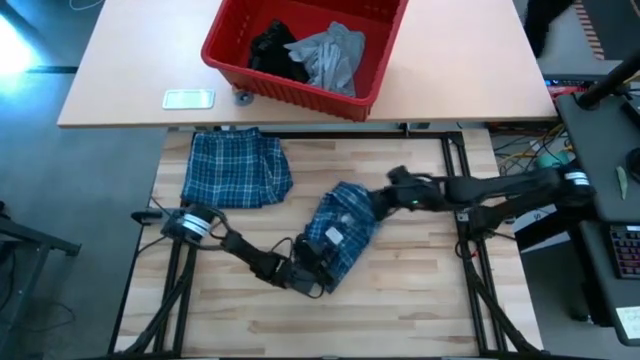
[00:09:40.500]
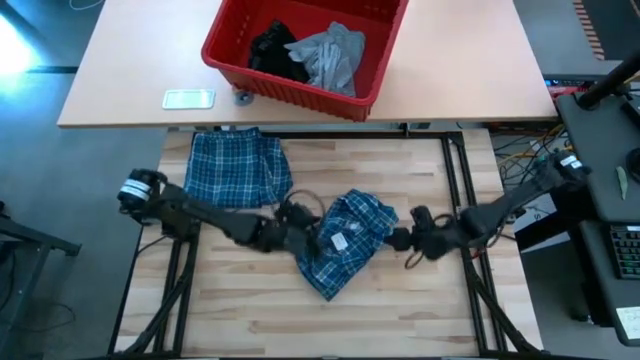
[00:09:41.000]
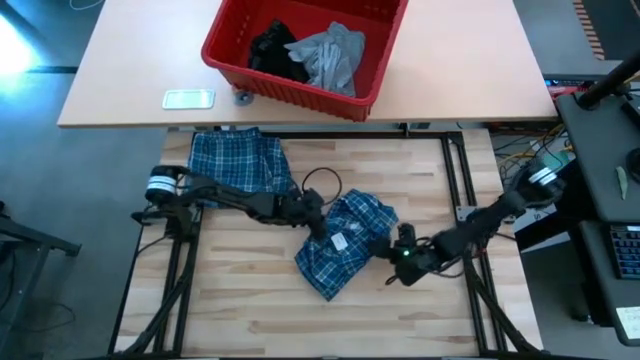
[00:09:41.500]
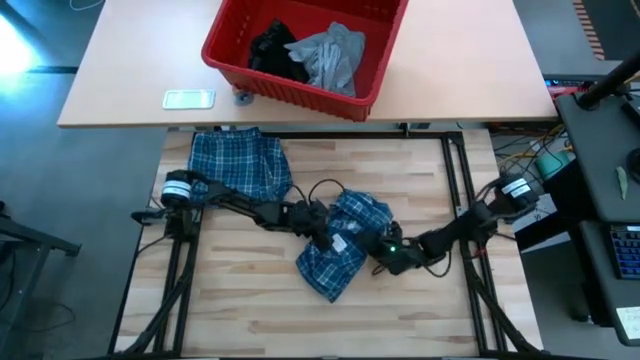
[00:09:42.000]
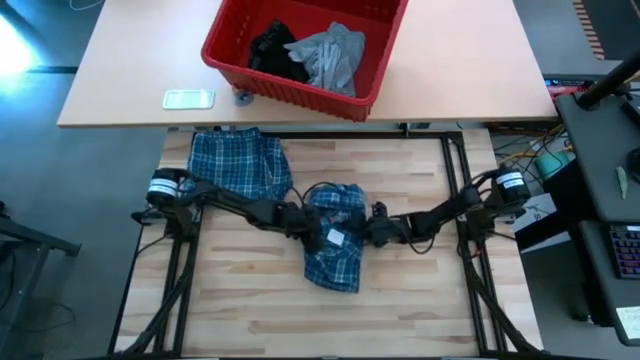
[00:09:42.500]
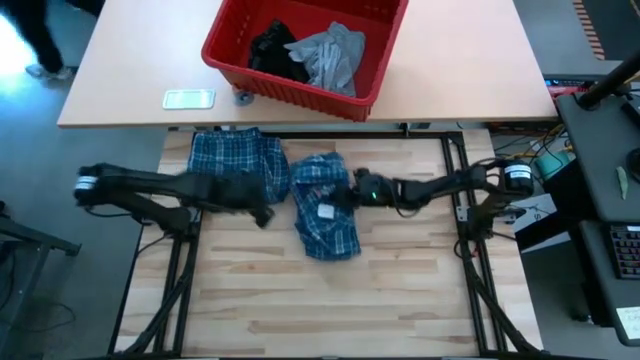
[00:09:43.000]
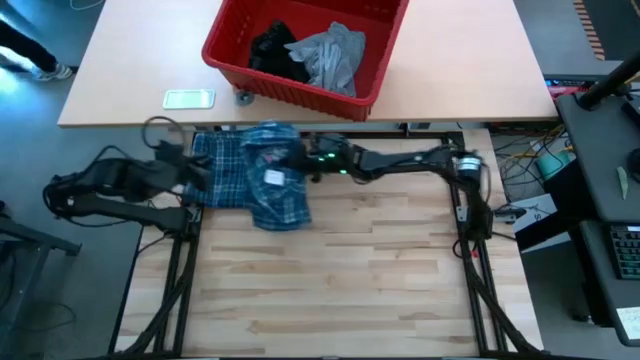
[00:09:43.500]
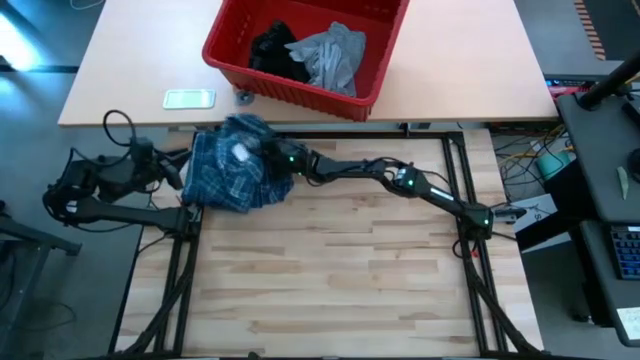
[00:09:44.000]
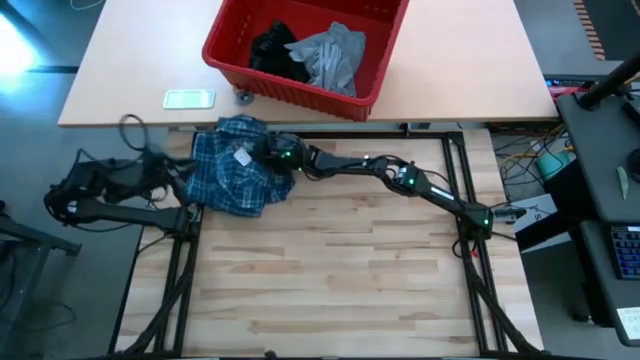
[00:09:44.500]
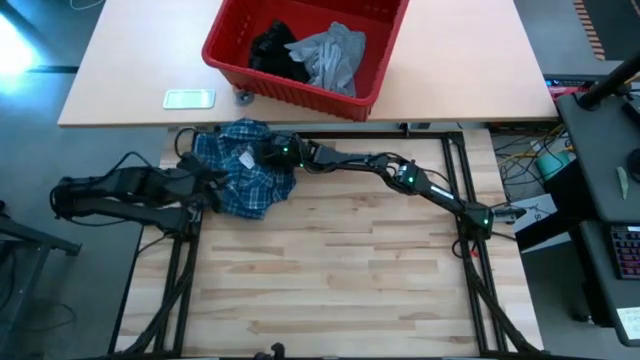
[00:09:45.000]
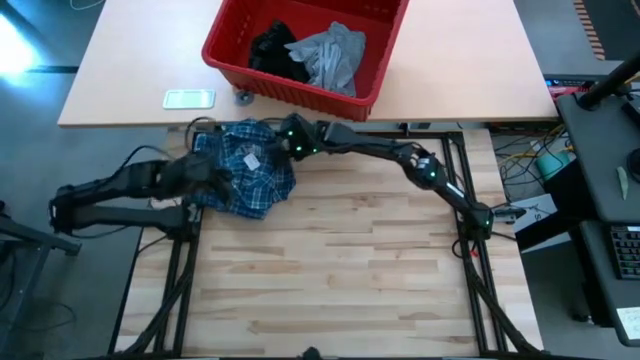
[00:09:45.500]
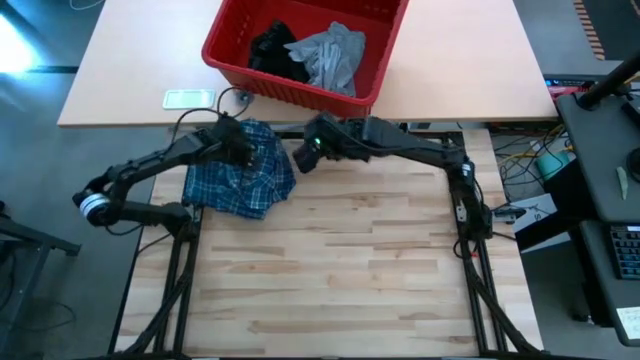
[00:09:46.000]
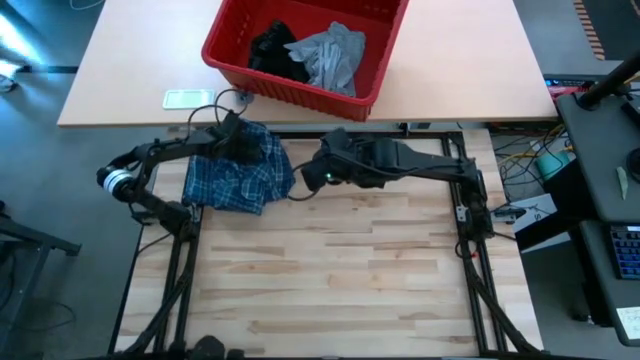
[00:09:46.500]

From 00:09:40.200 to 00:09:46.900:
Task: Fold Laundry from Bin
Stack the blue patterned long sleeve shirt on top of the blue patterned pants

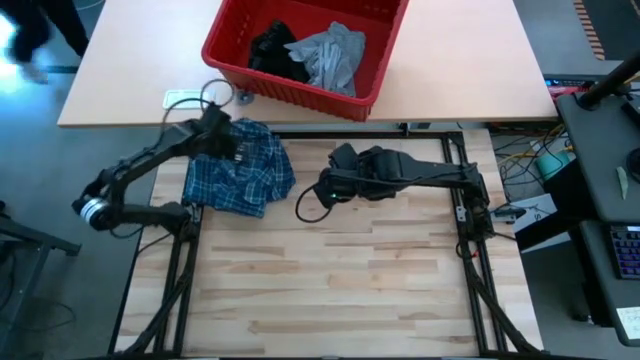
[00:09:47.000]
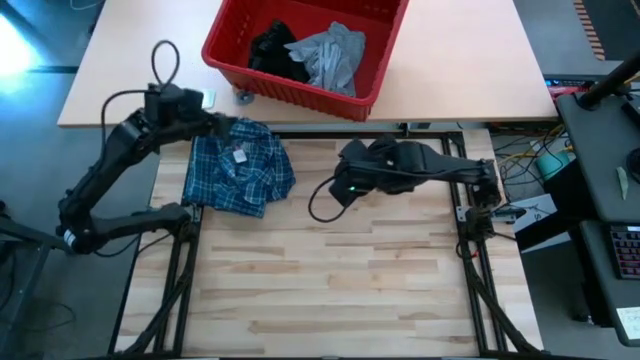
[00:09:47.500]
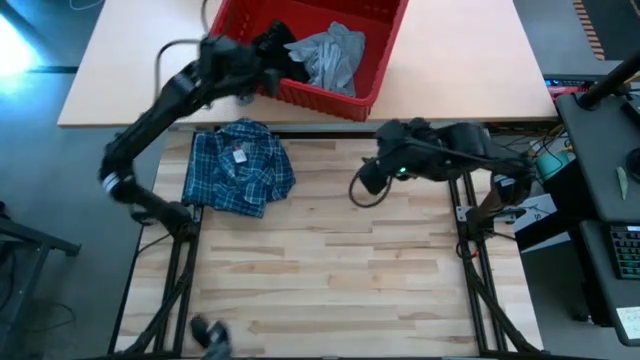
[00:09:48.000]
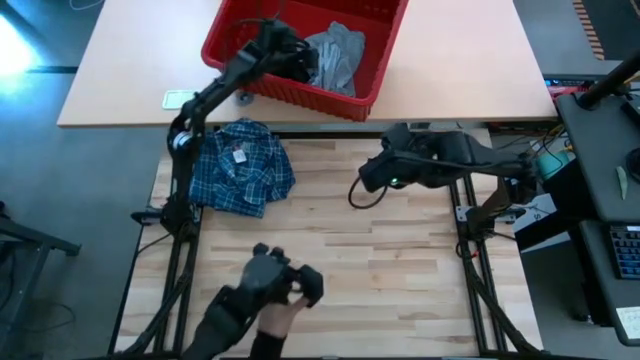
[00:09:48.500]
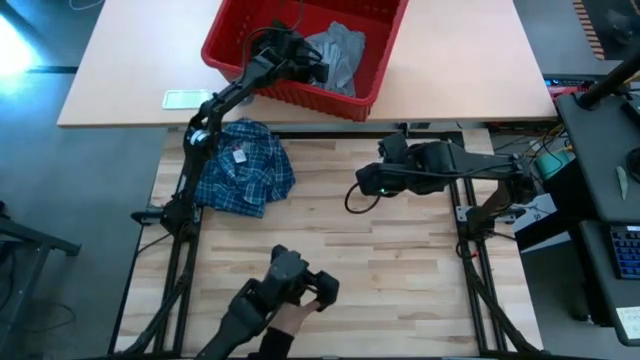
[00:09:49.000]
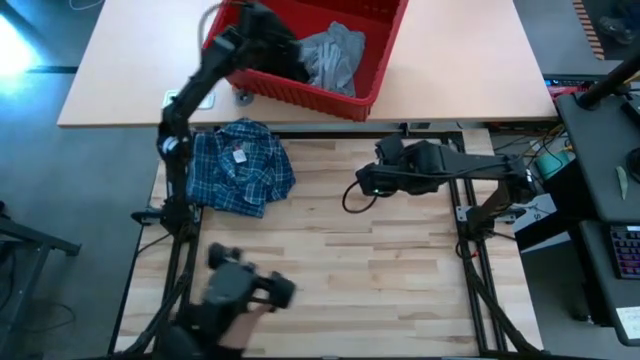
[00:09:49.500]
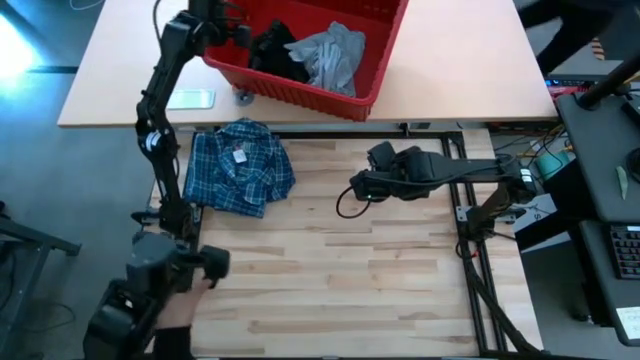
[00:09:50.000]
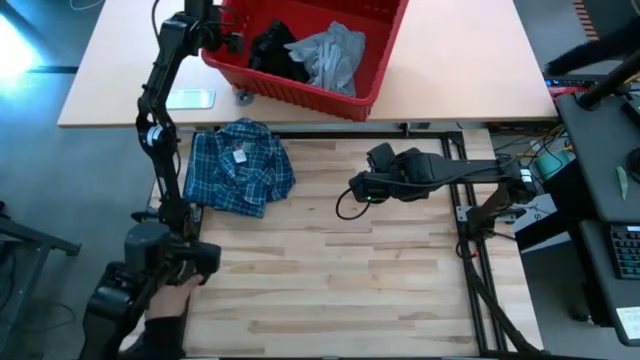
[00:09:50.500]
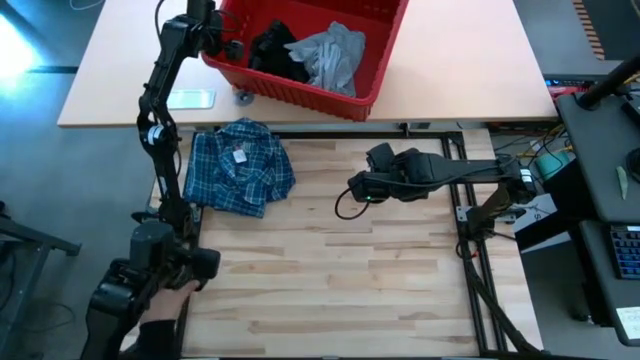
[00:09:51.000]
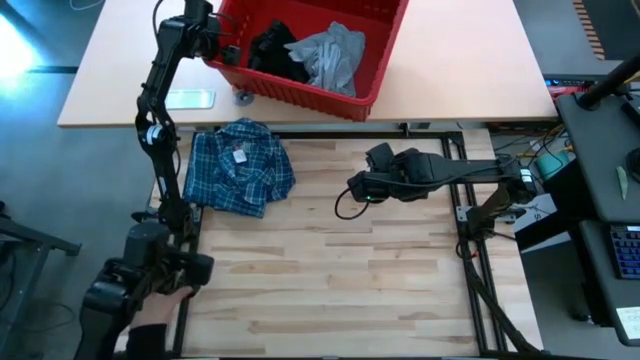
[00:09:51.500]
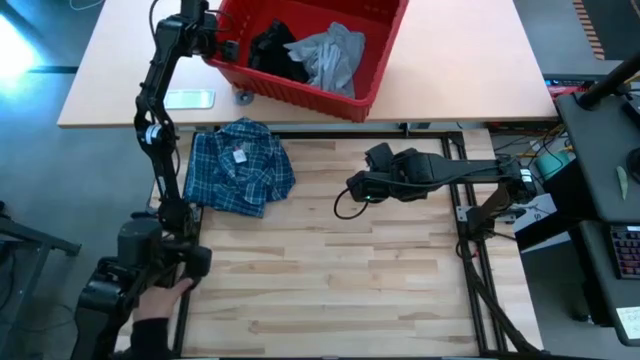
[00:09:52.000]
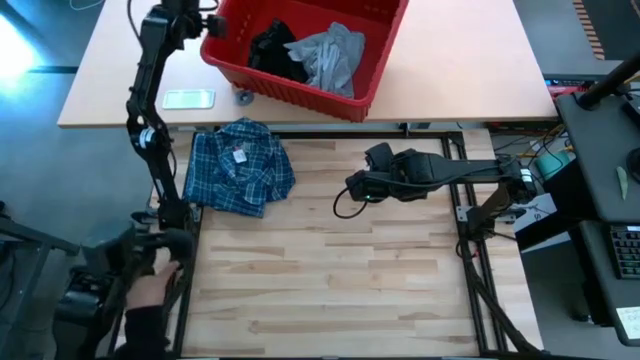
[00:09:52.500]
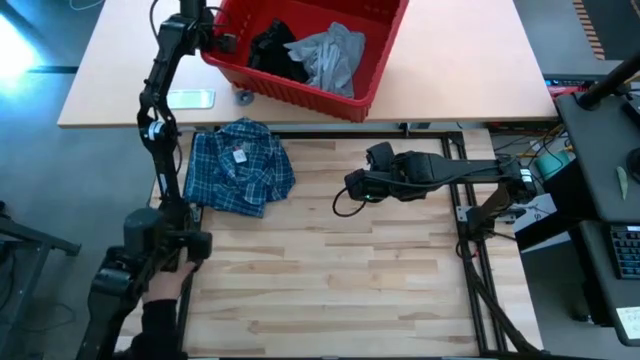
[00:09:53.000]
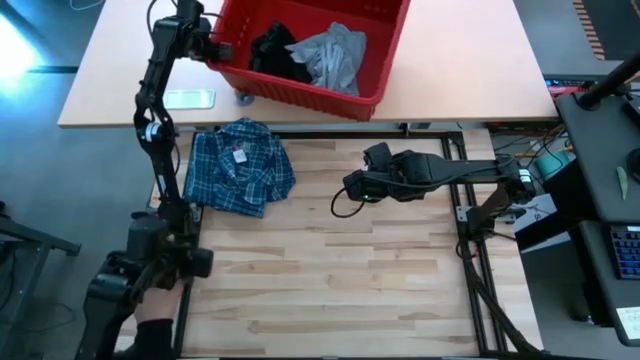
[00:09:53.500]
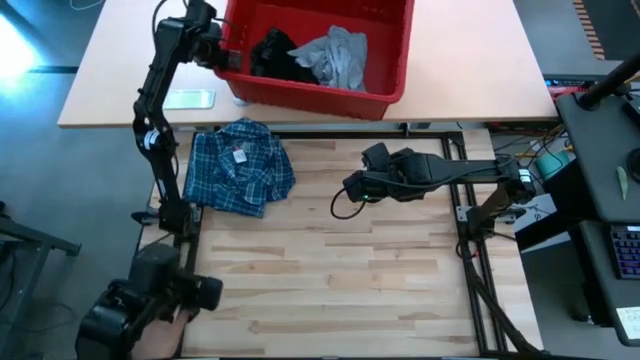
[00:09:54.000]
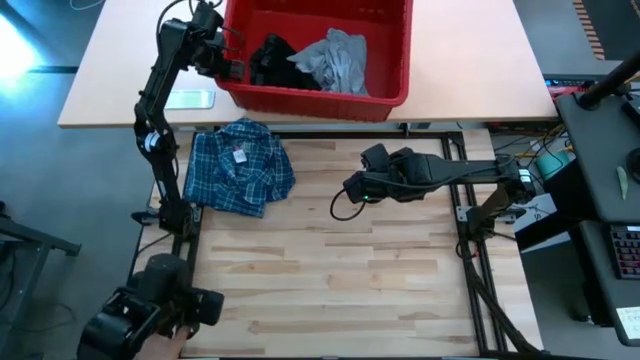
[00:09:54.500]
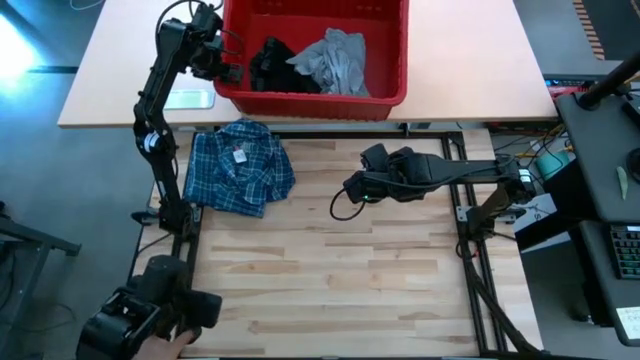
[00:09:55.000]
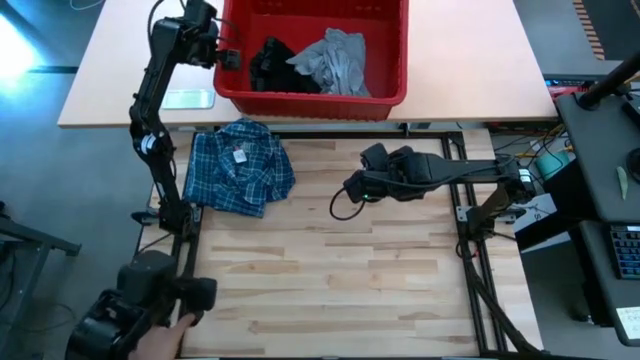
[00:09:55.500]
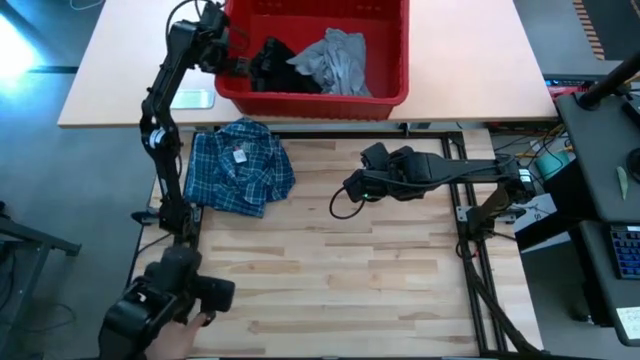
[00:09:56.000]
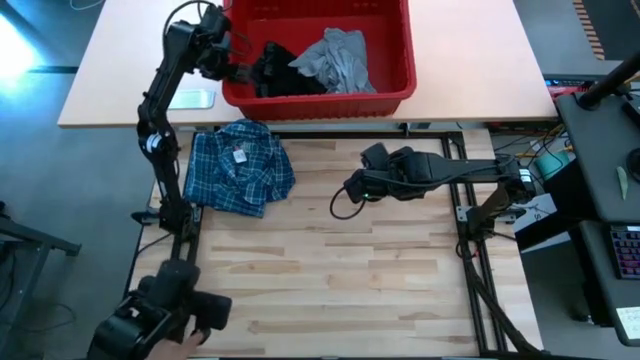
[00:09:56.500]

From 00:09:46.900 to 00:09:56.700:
Adjust the red bin

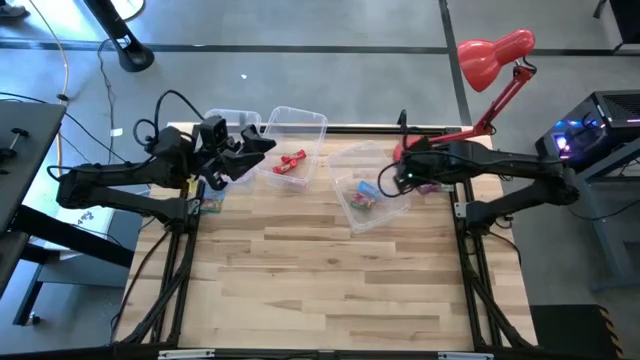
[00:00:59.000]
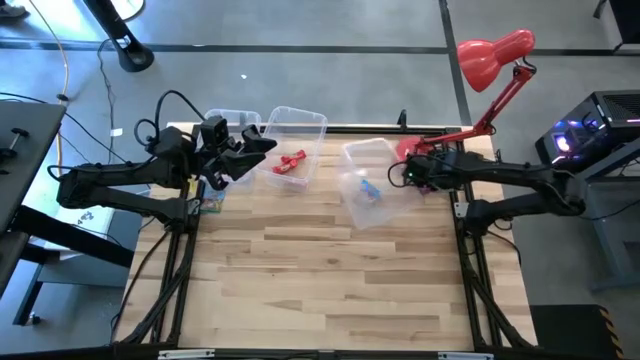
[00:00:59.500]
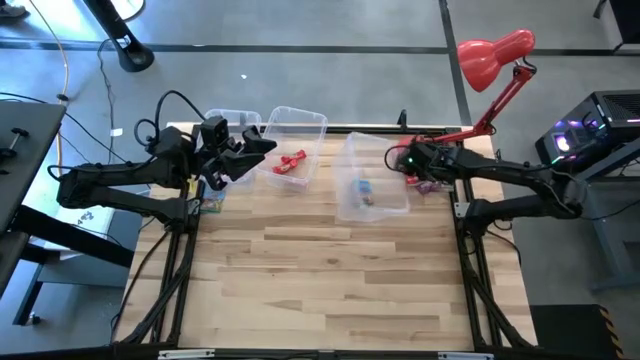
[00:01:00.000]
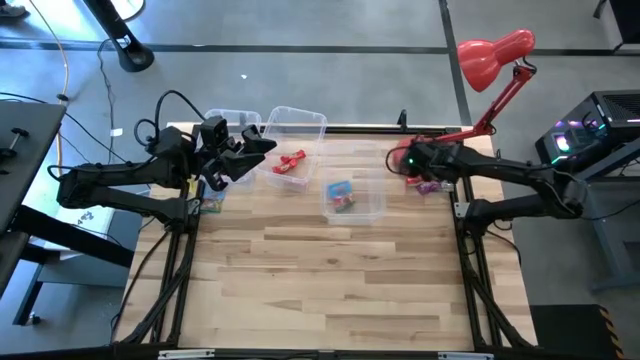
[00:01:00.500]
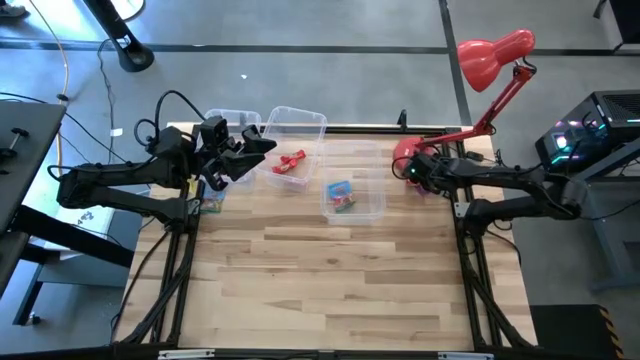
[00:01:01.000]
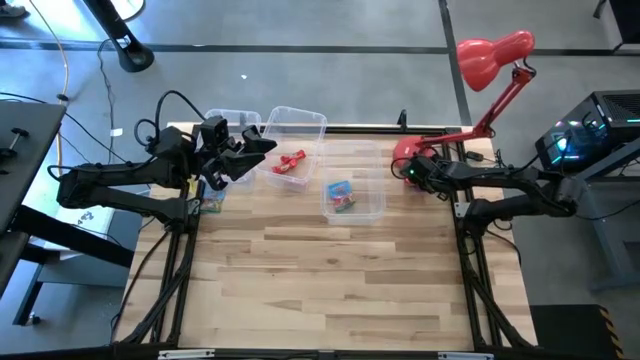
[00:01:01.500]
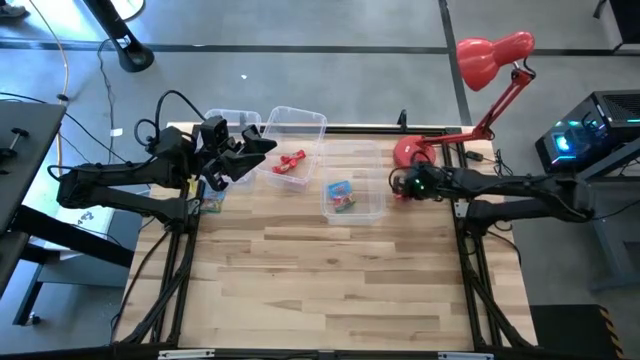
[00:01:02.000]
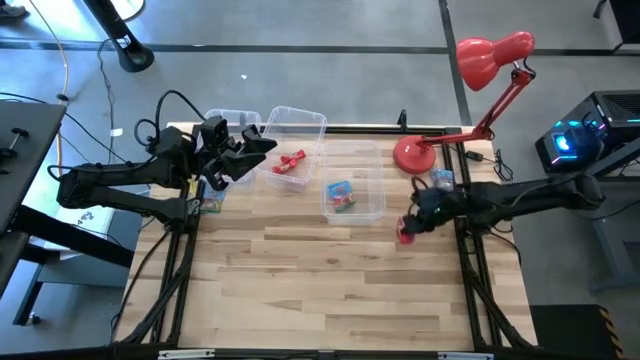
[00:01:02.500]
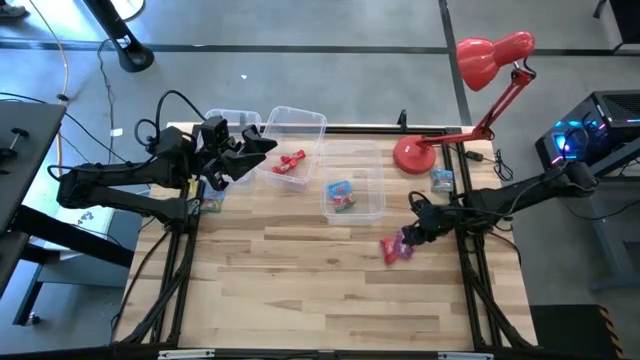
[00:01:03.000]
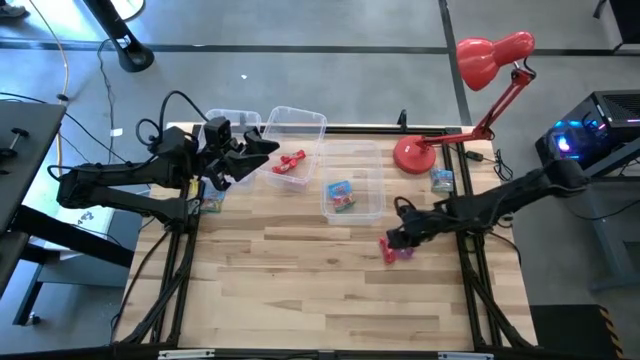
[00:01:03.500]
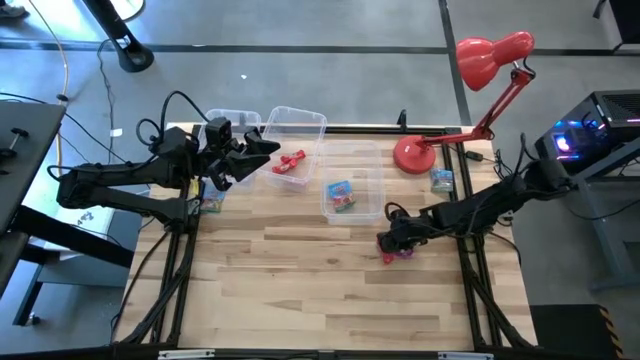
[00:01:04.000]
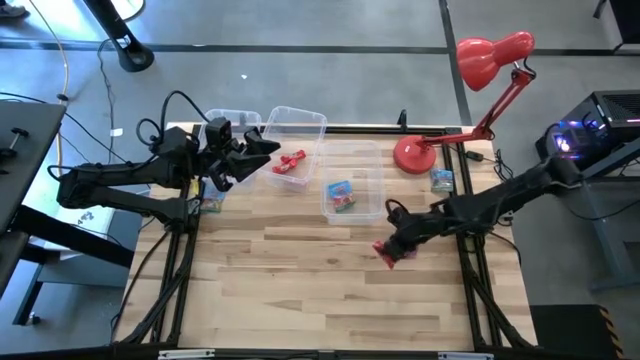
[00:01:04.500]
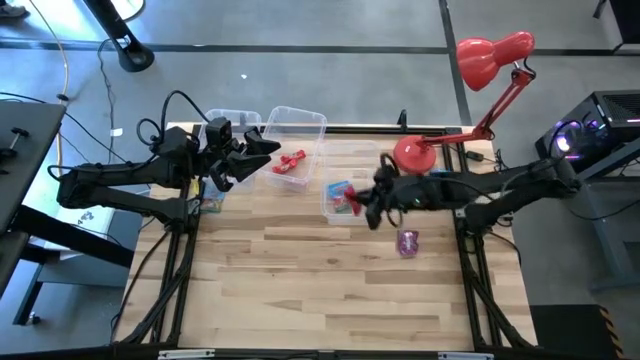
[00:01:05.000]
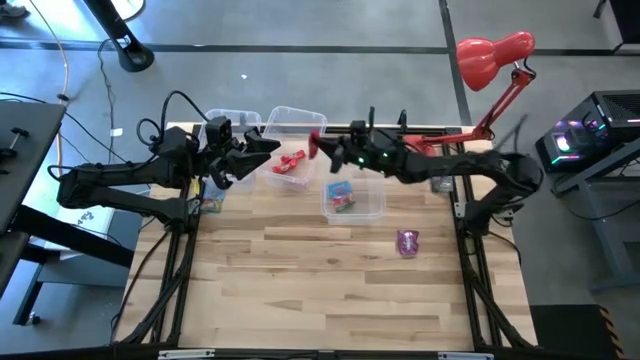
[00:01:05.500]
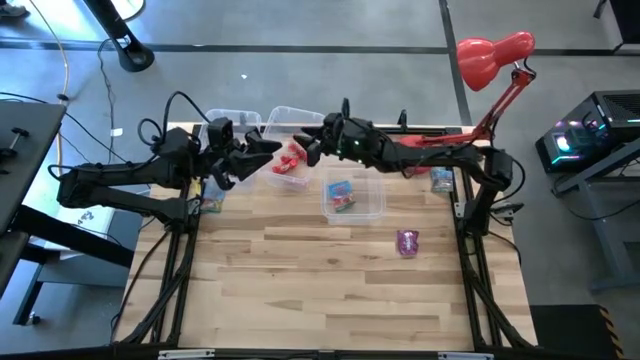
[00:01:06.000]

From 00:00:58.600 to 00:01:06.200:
Task: Sort candy
Put the red candy bag into the center transparent bin
